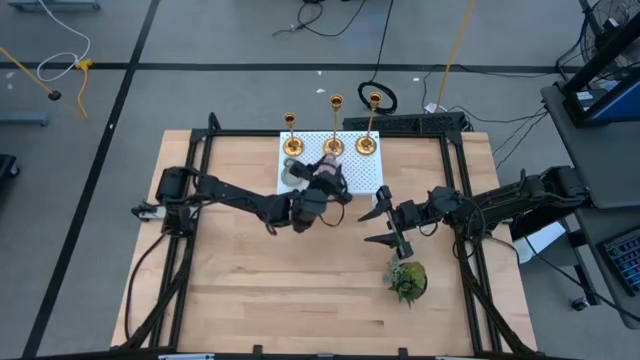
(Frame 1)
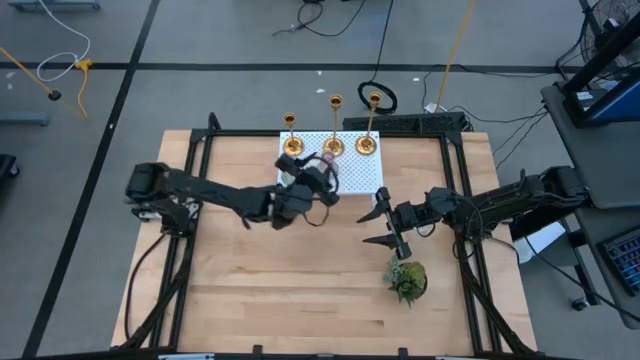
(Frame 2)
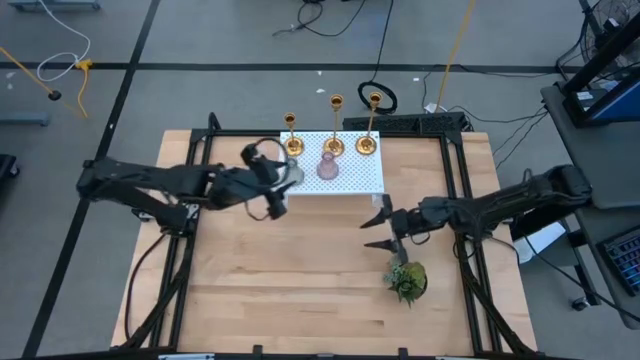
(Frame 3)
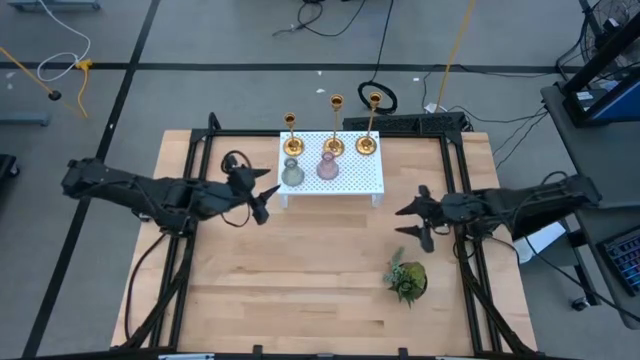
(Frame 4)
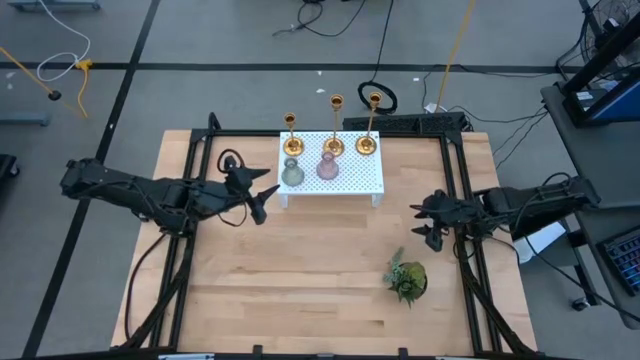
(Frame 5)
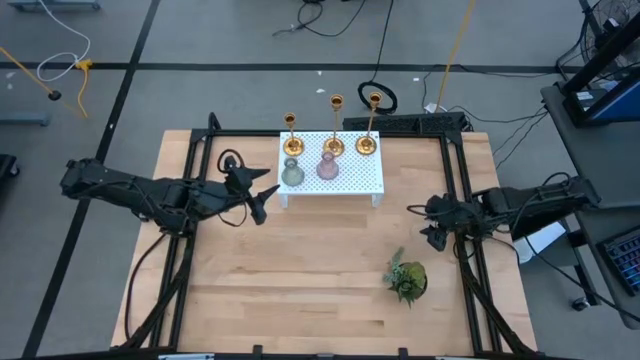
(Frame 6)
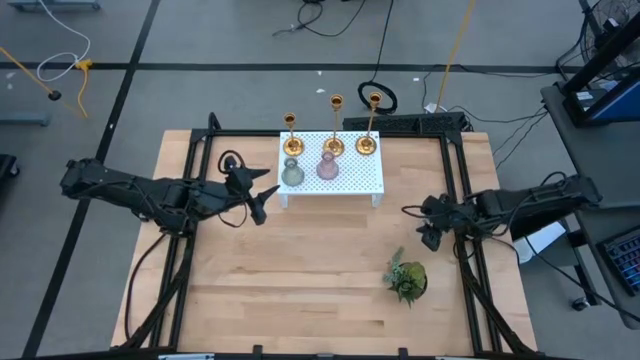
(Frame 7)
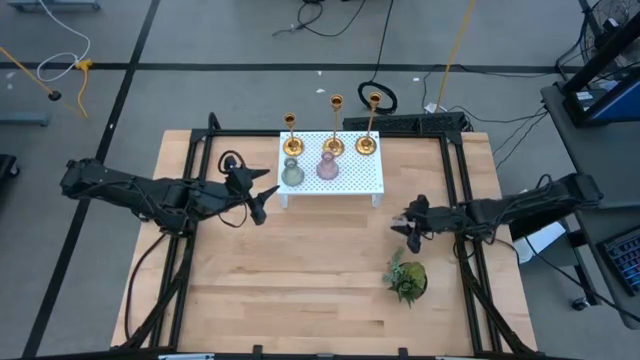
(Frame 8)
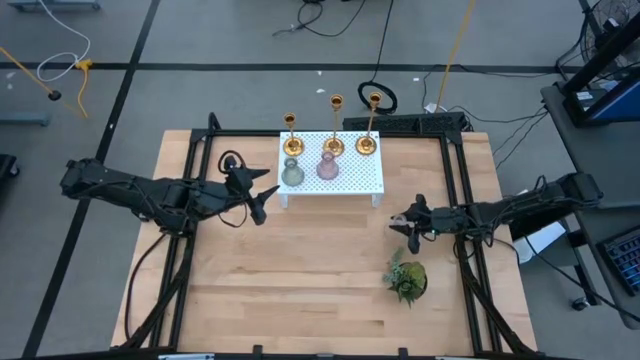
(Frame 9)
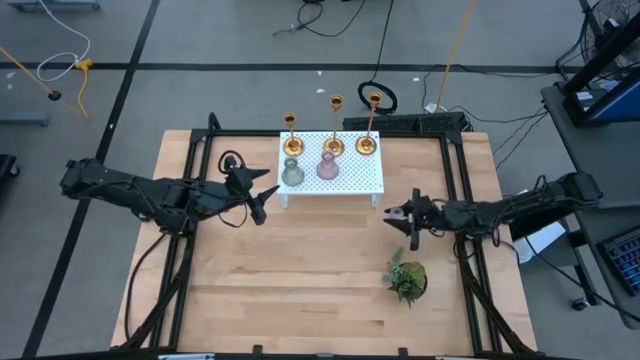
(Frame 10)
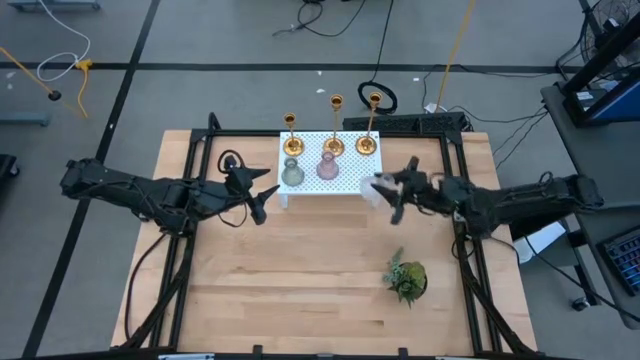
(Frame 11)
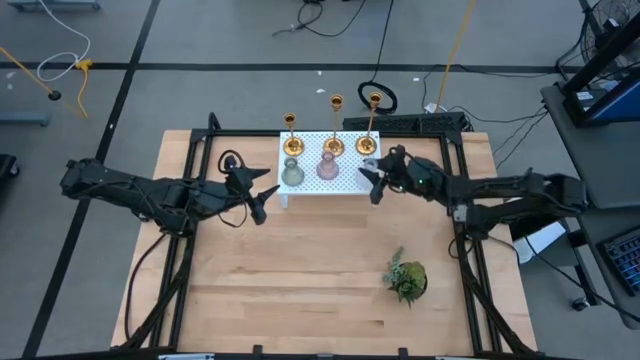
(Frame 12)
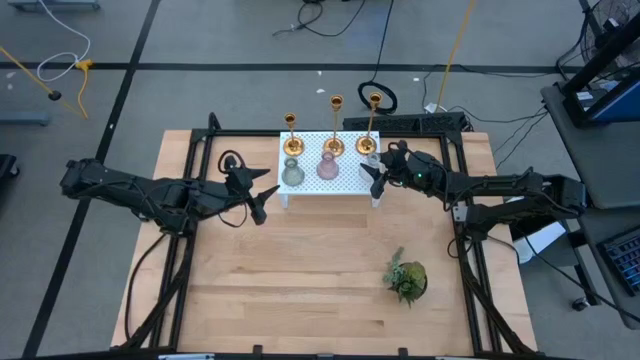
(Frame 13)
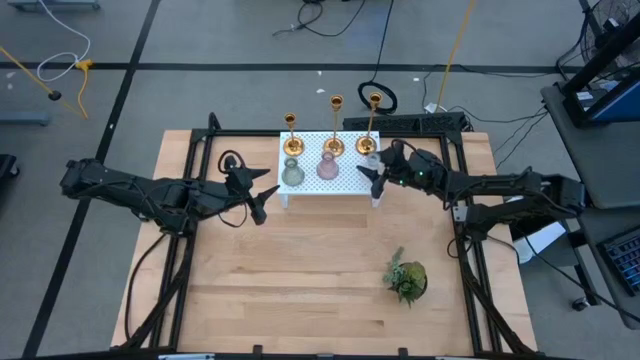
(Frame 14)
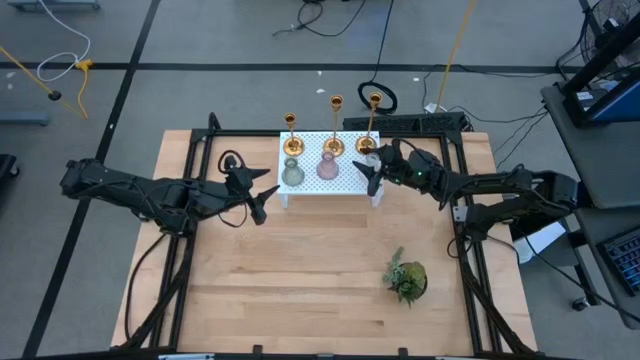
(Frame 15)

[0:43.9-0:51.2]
Task: Pick & Place candle stick holders
Put the transparent candle holder on the shelf

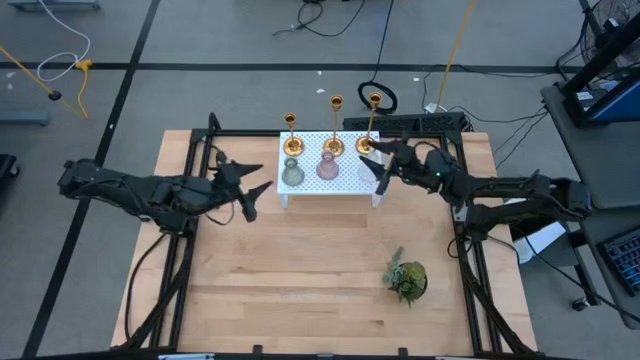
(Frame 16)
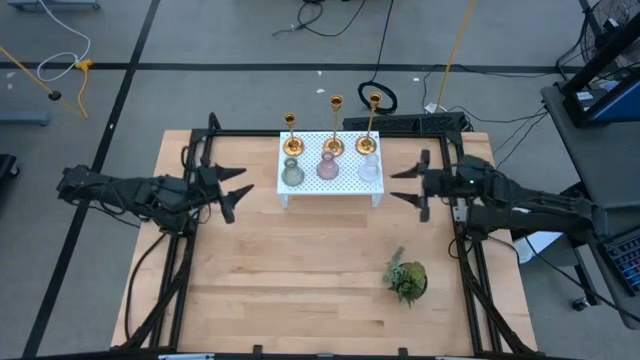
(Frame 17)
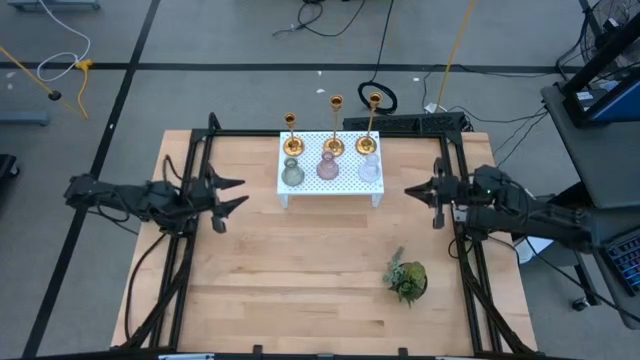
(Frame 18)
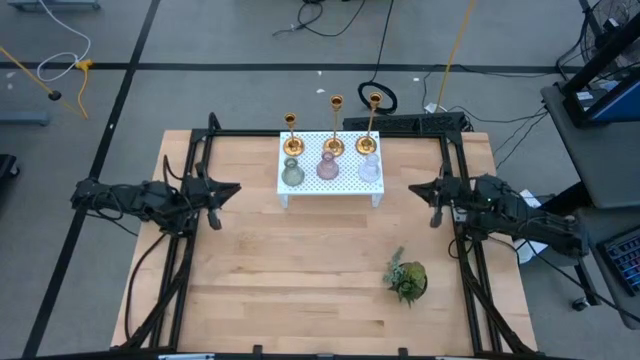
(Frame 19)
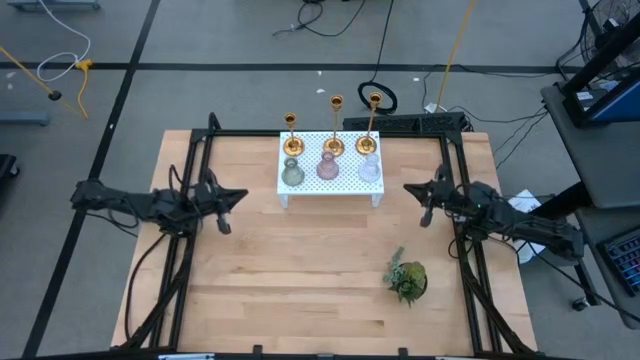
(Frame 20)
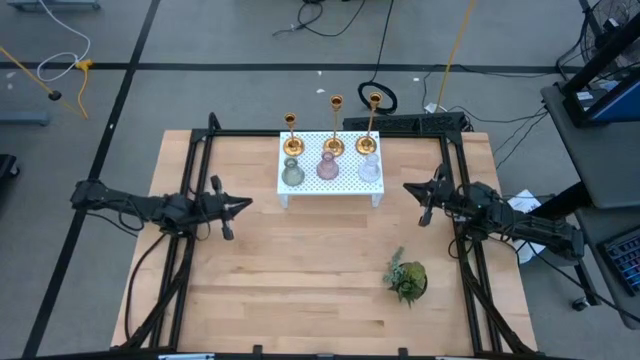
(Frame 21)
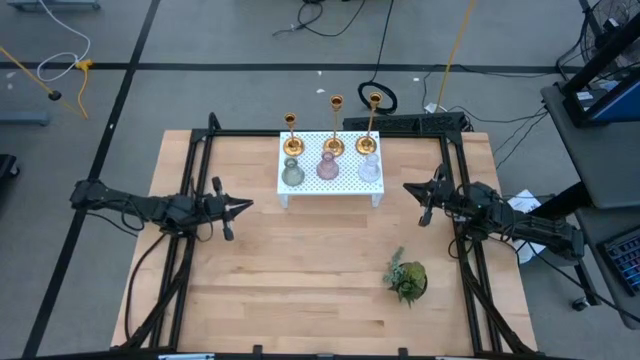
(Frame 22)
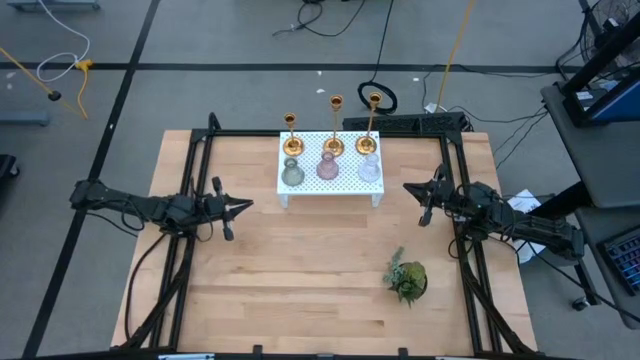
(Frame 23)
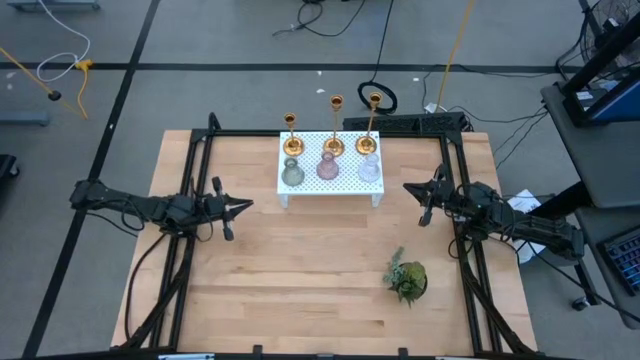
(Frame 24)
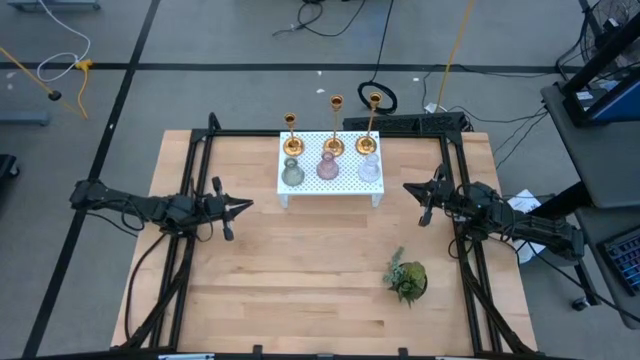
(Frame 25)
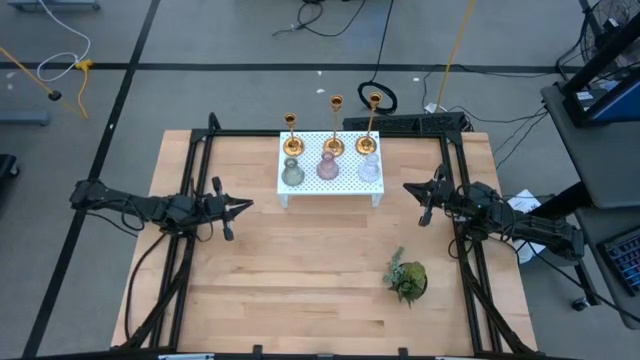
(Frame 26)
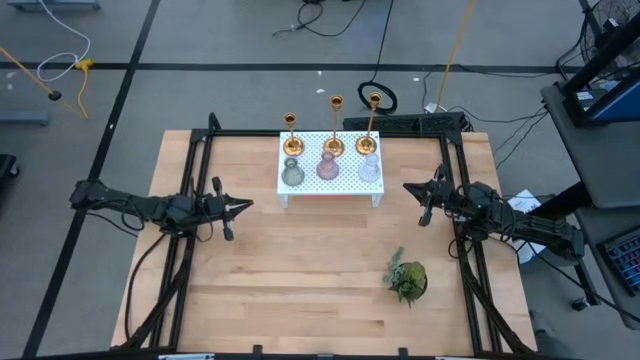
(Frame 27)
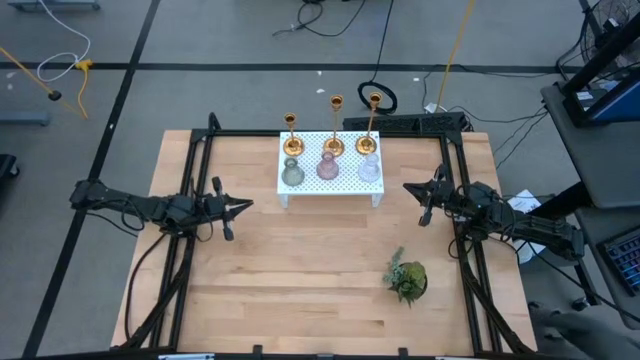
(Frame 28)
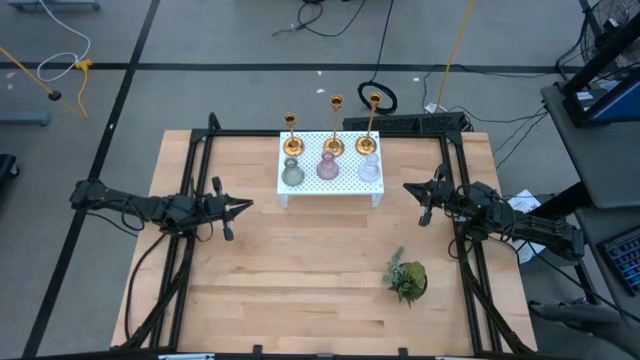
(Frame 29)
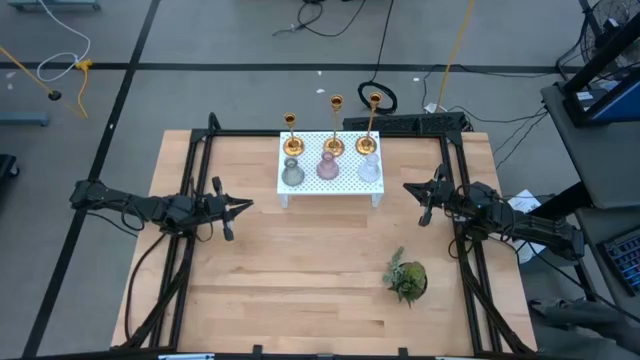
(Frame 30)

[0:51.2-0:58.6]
Return to Home Position

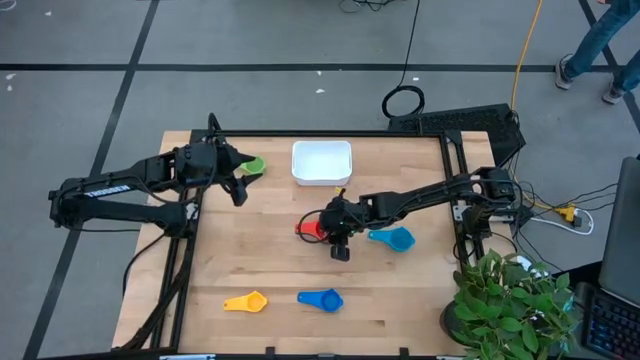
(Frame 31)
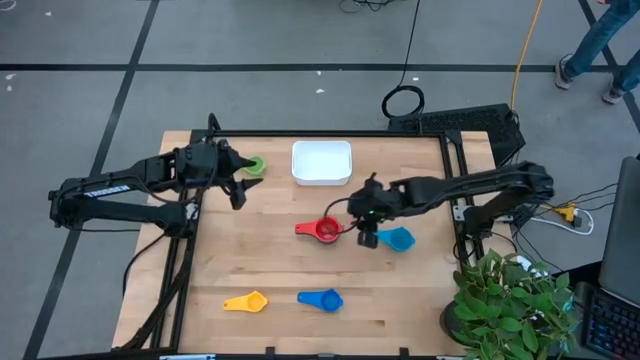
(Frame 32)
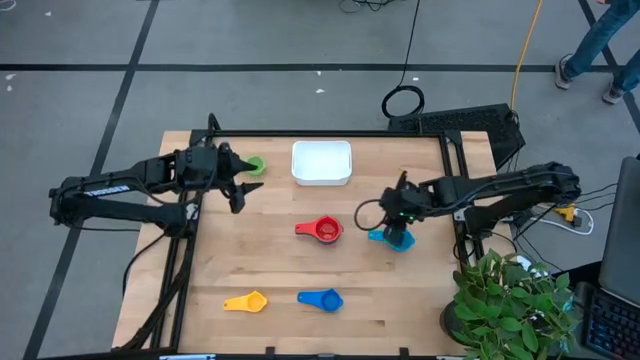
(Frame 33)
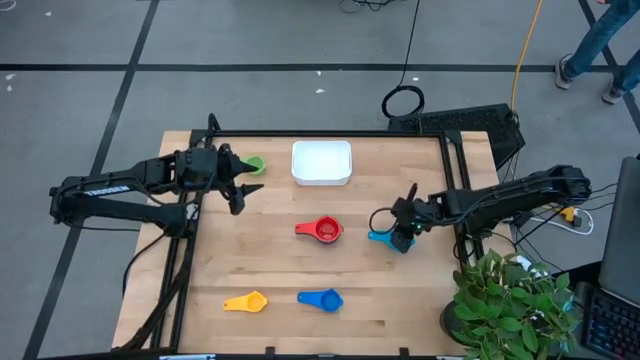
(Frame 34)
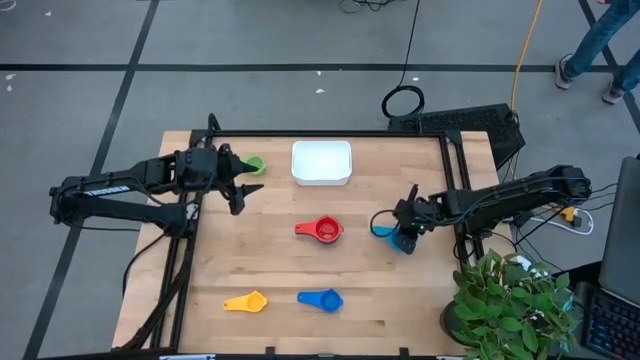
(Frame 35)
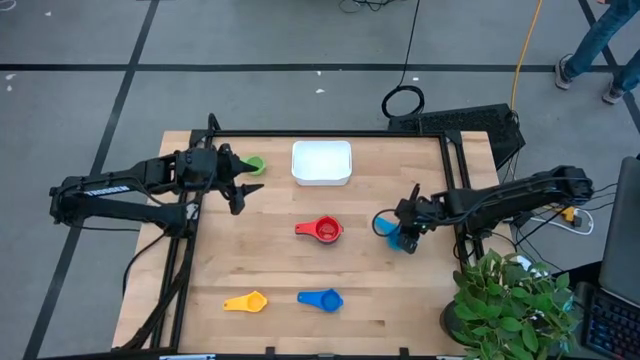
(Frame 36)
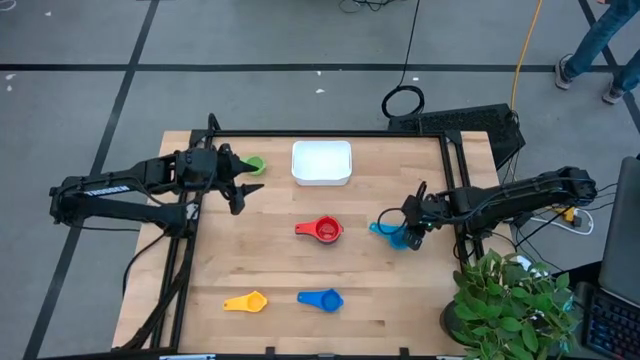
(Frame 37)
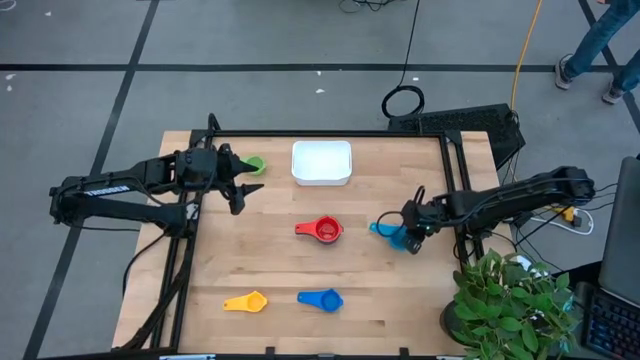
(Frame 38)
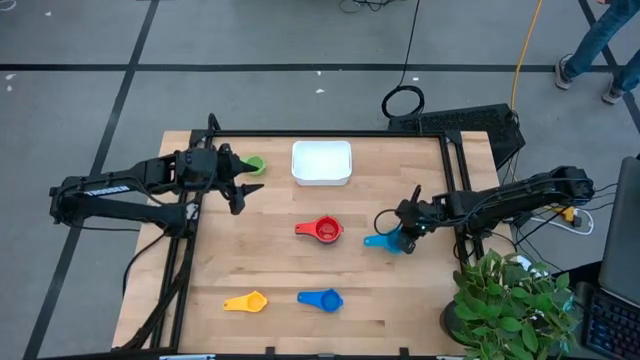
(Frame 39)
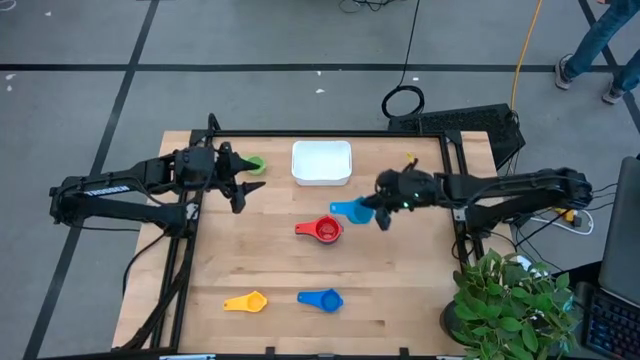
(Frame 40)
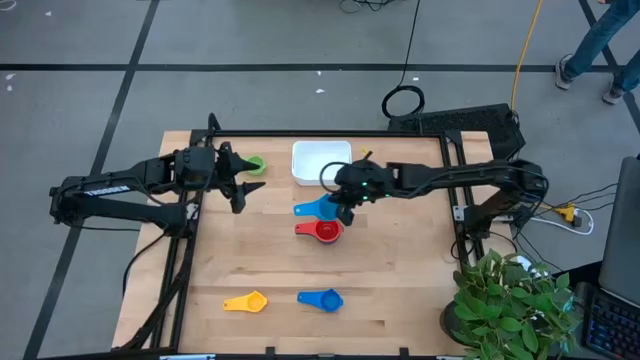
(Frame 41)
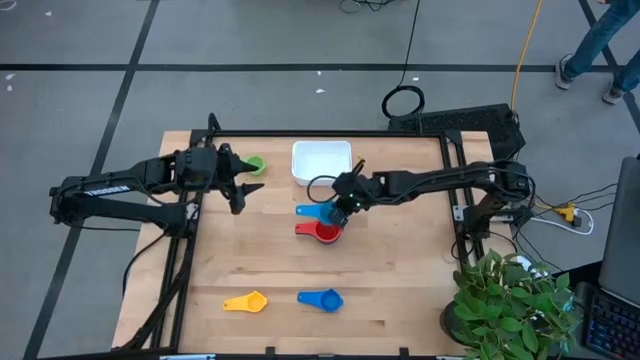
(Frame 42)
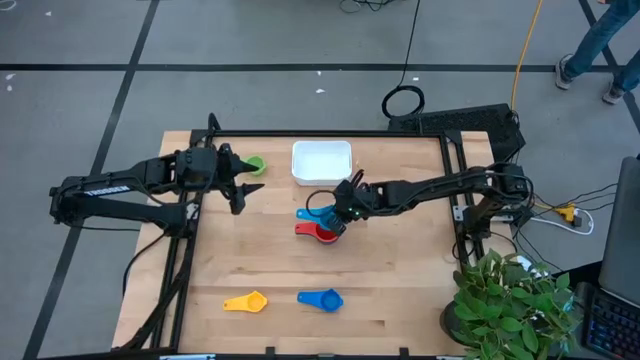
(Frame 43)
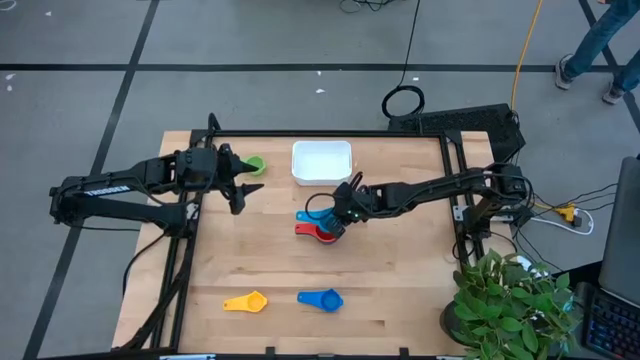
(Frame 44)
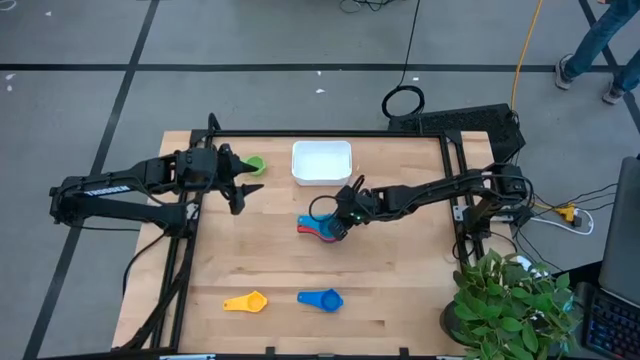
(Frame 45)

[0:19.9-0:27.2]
Task: Nest measuring cups in basket
Stack the light blue measuring cup on the red measuring cup
